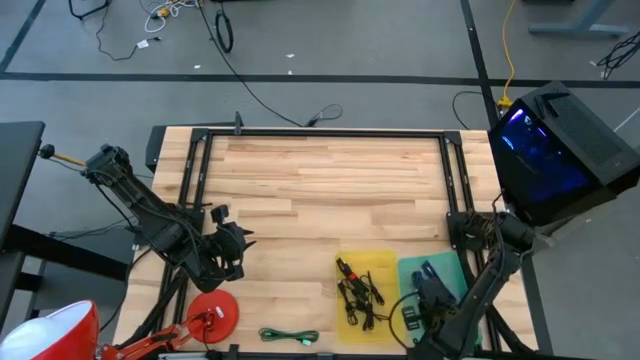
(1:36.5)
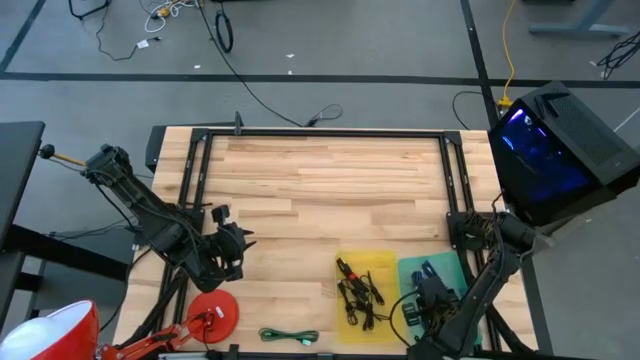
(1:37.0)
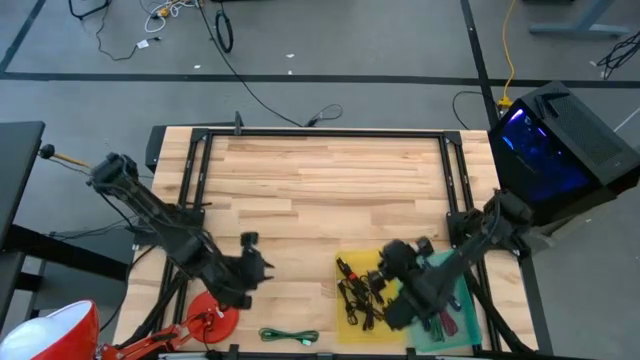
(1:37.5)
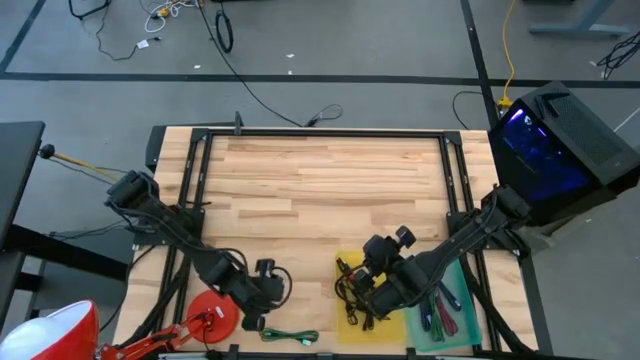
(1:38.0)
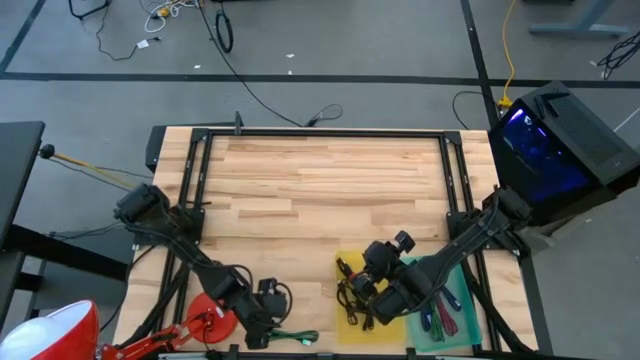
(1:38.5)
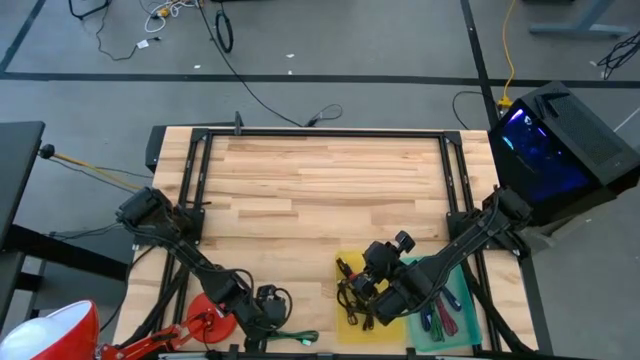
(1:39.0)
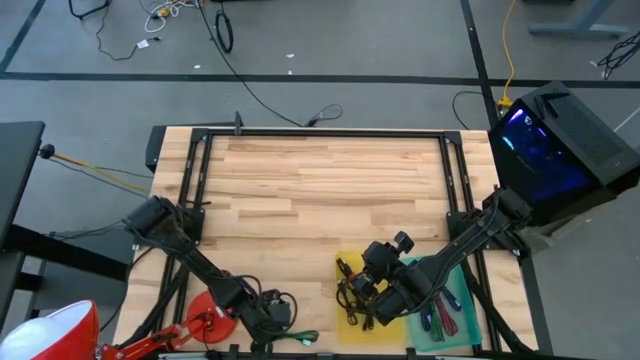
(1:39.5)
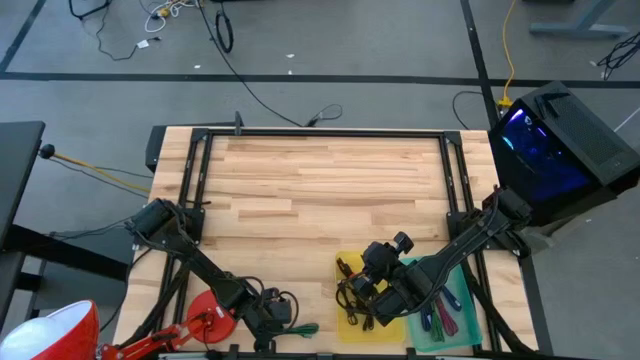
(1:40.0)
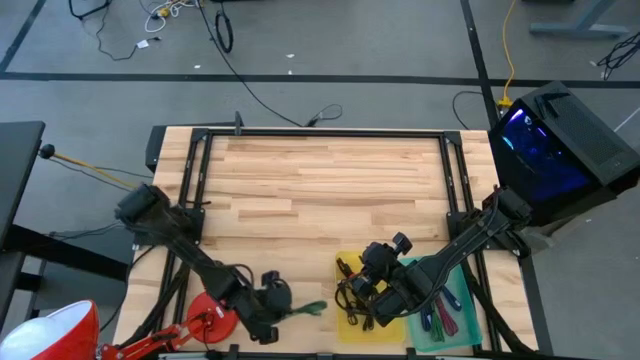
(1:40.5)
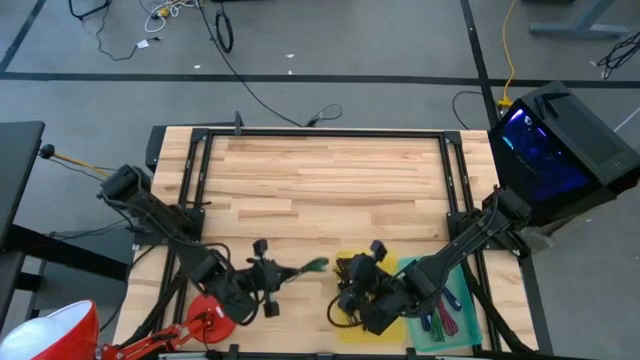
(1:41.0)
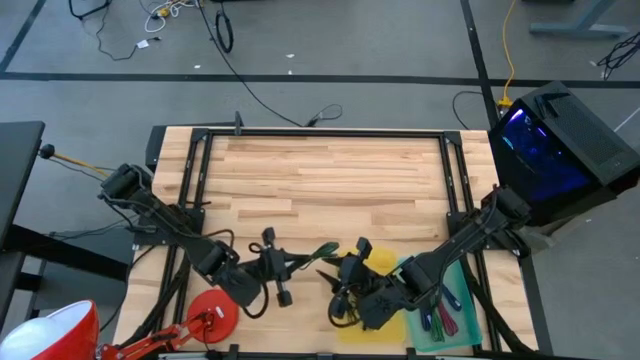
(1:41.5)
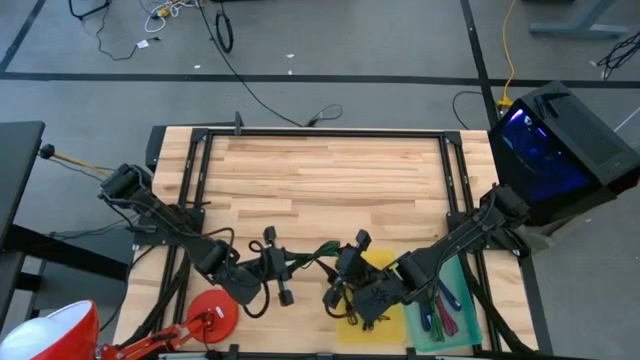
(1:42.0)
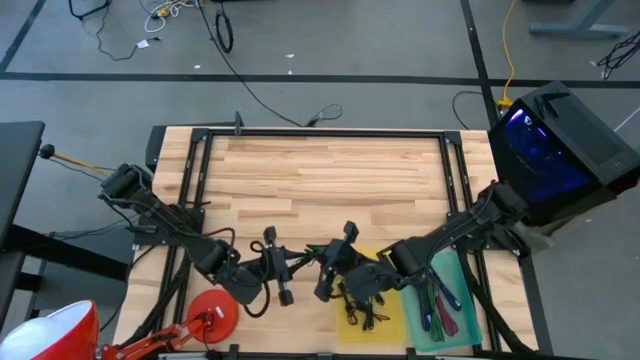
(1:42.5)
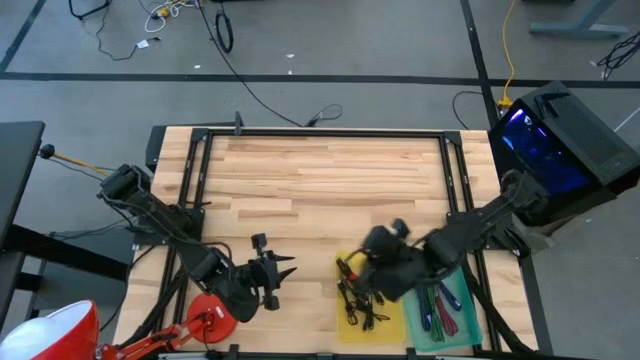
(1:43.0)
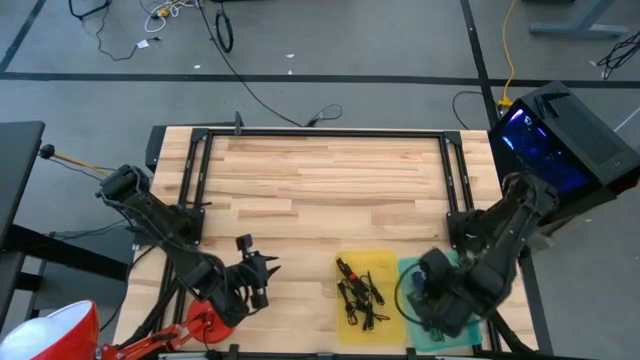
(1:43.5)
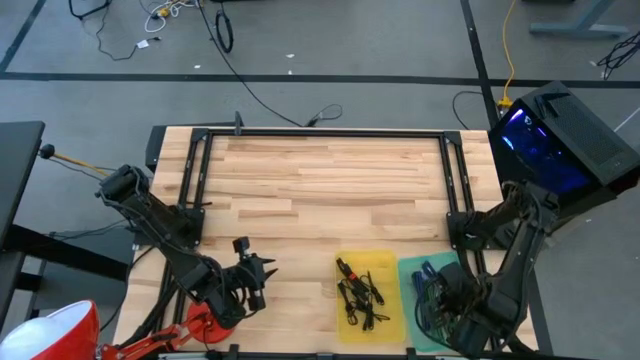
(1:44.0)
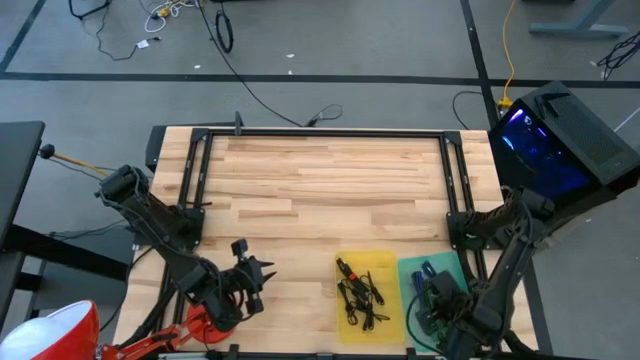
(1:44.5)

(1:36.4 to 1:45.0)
Task: Pick & Place USB Port
Put the green pattern charger cable into the blue bin

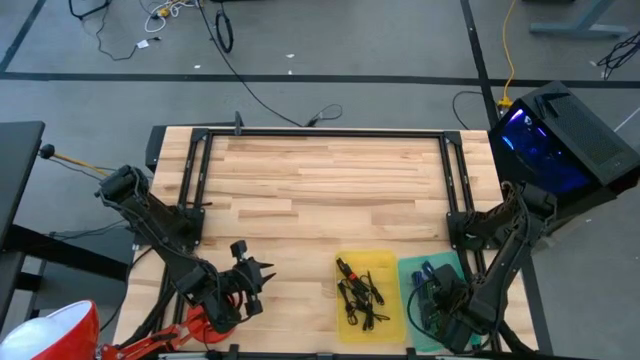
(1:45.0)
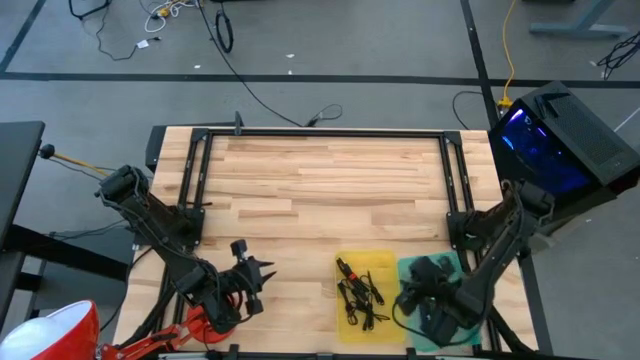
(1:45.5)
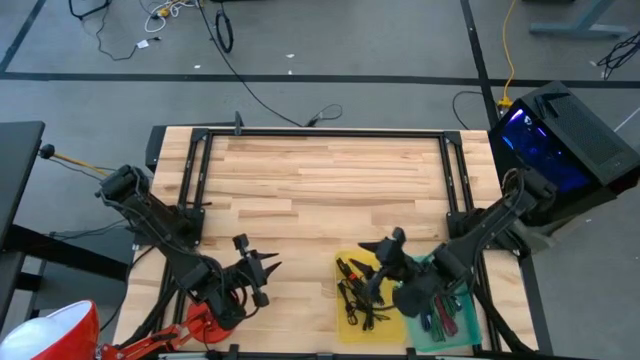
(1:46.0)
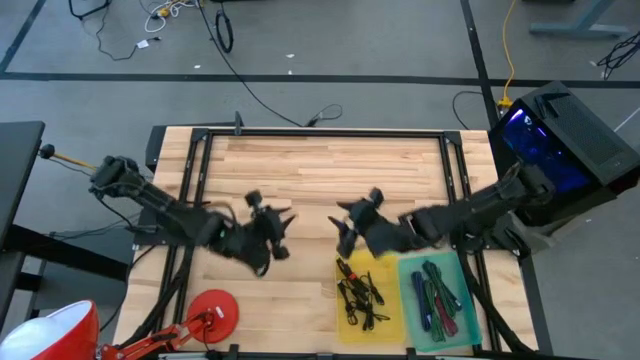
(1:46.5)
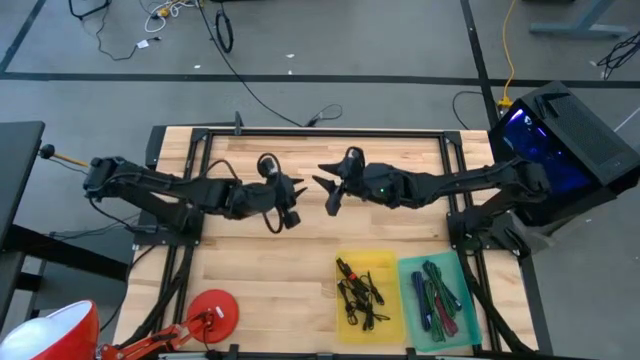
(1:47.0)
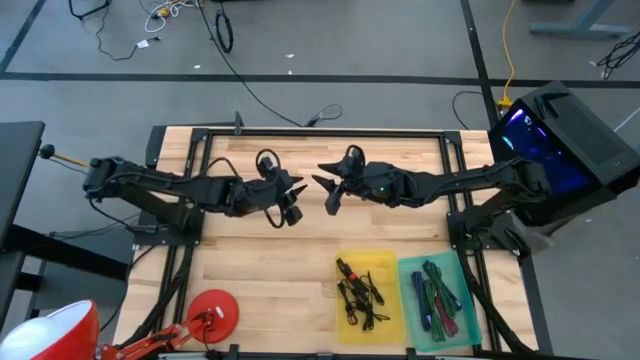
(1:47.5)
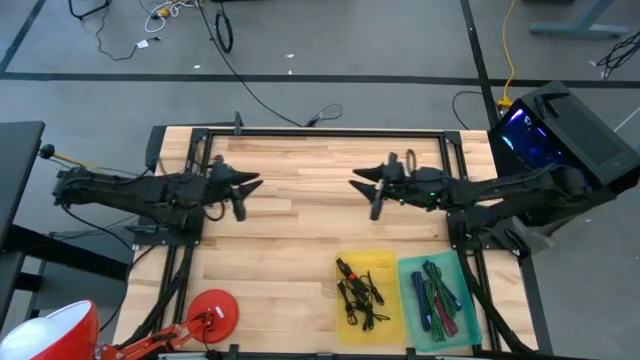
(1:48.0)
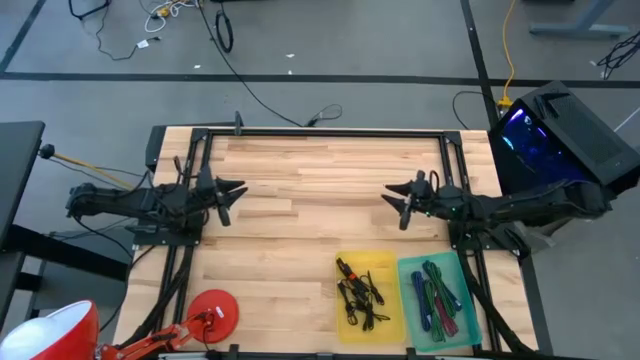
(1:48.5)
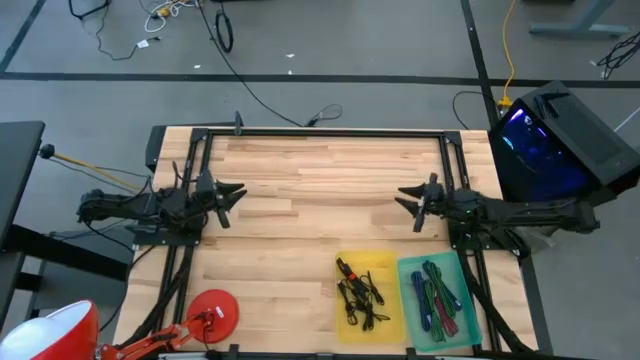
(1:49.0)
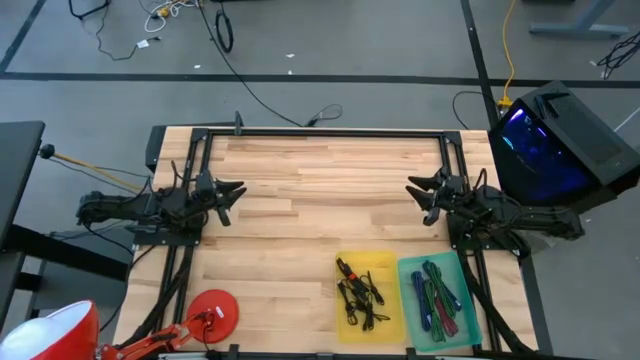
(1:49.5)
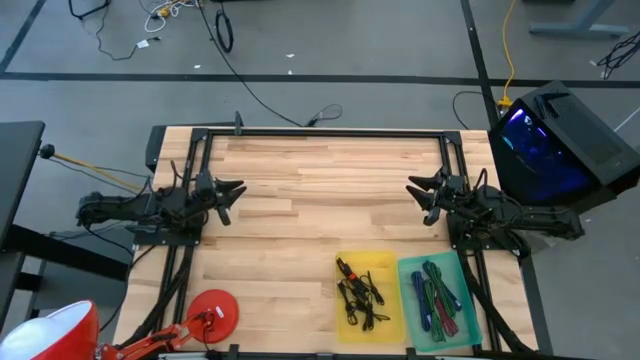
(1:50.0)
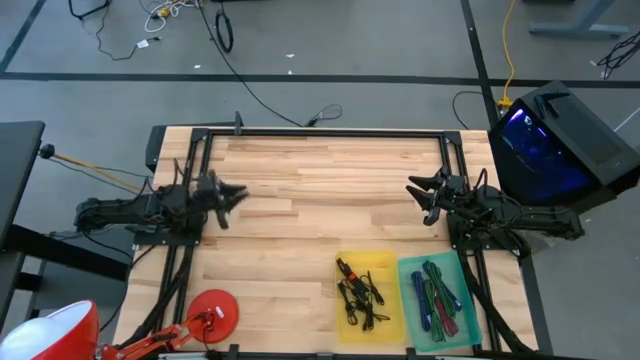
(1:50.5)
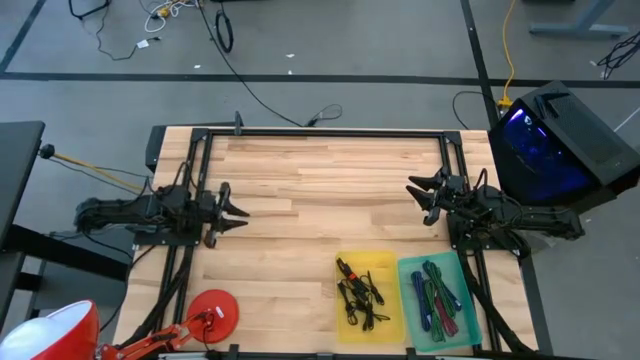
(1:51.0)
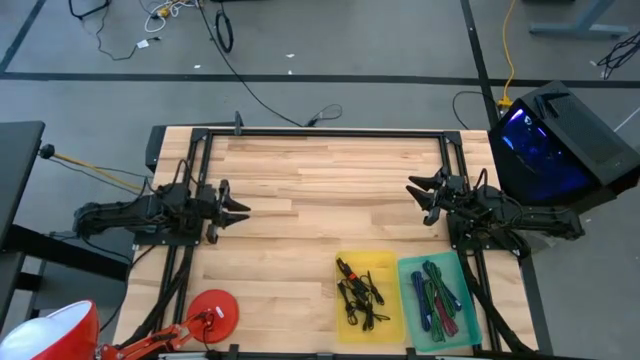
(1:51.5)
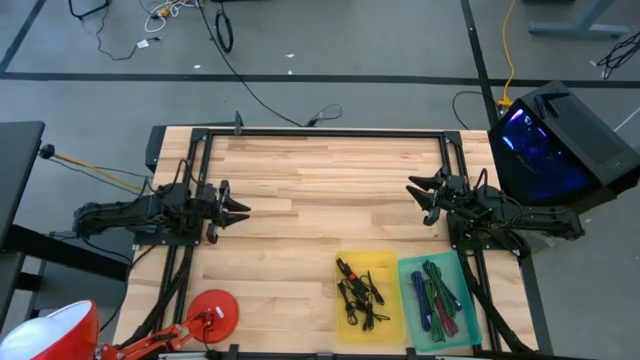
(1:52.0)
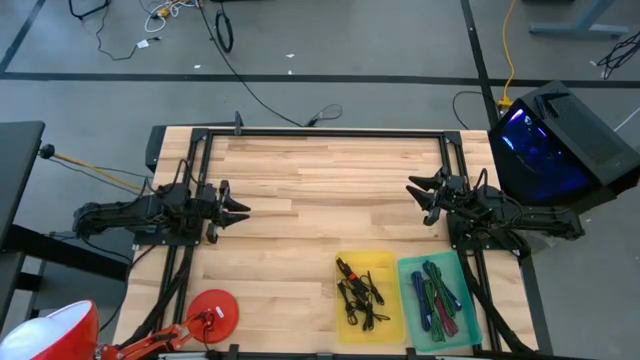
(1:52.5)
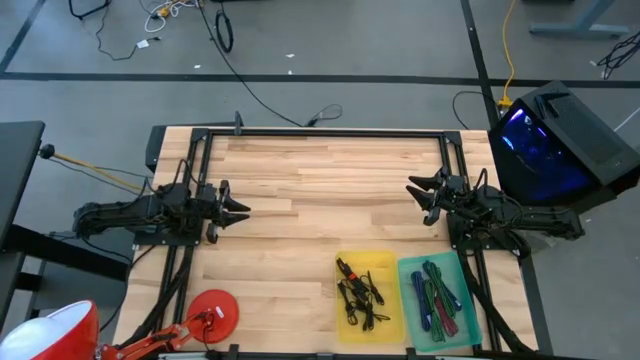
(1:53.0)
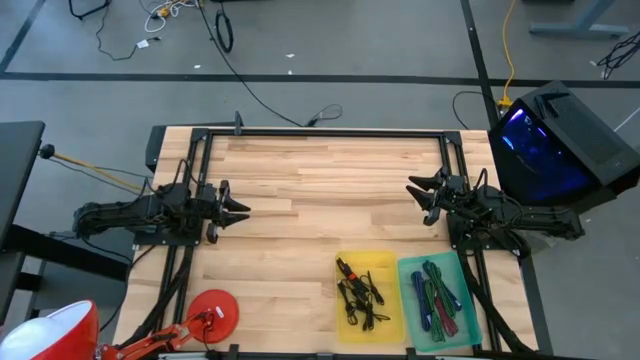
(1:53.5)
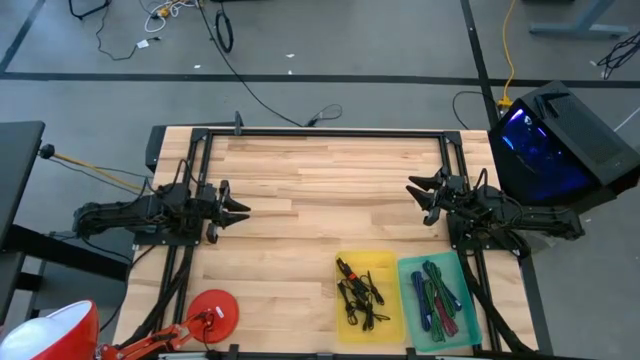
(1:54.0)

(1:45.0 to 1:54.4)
Return to Home Position

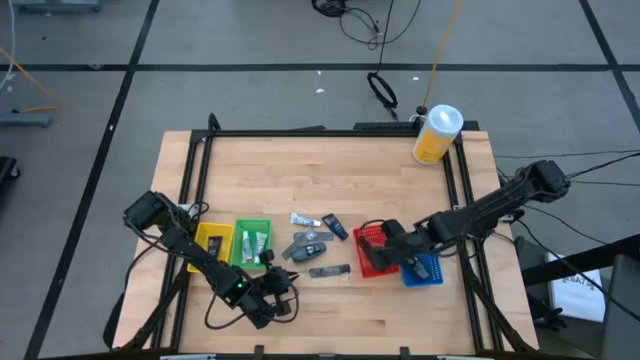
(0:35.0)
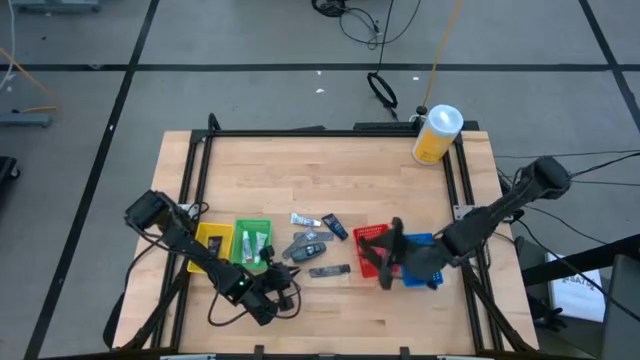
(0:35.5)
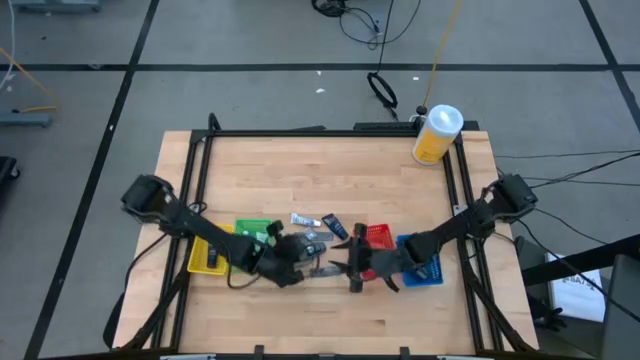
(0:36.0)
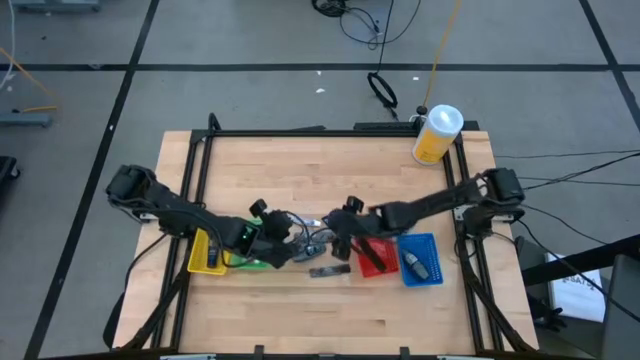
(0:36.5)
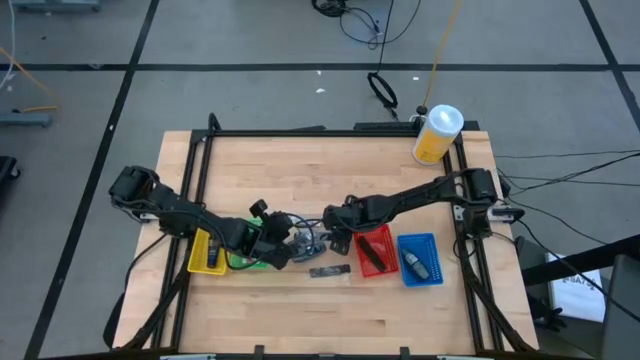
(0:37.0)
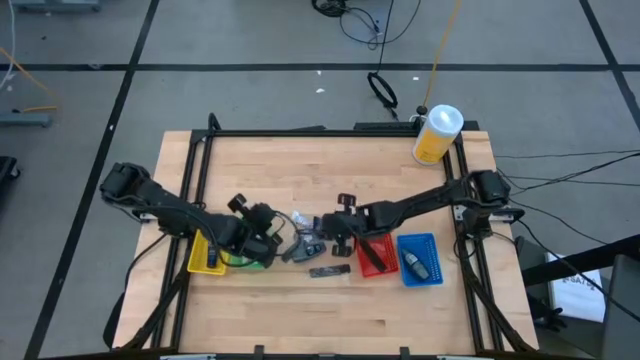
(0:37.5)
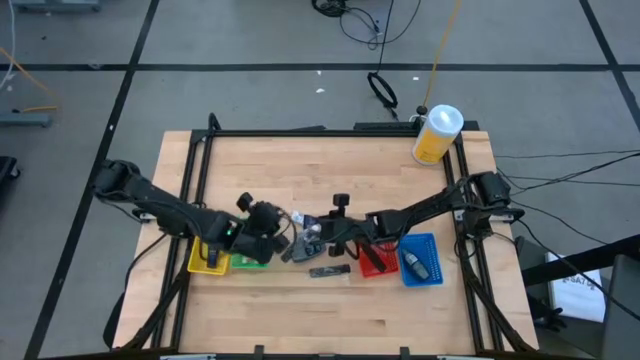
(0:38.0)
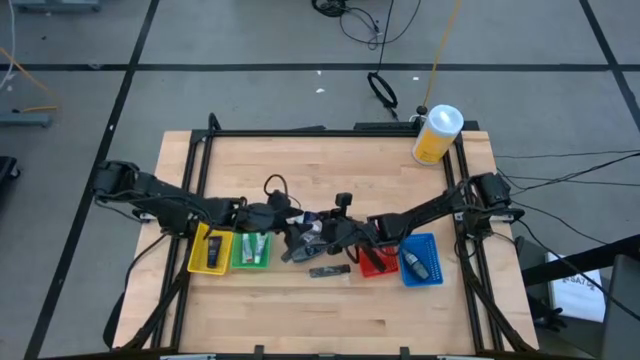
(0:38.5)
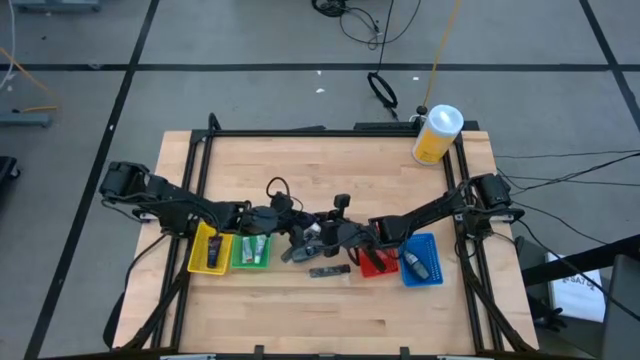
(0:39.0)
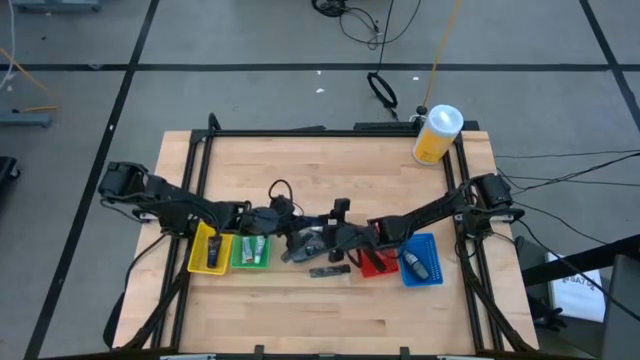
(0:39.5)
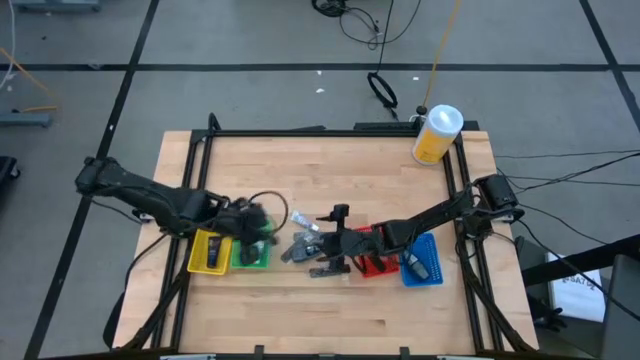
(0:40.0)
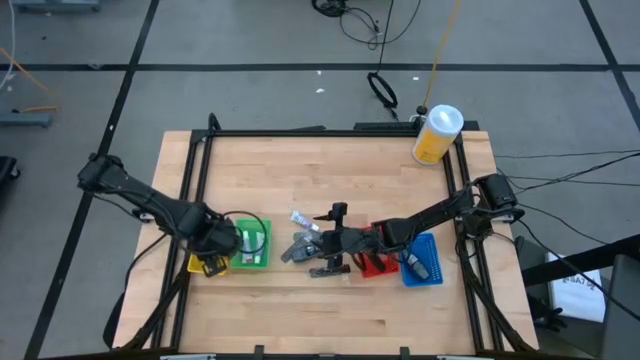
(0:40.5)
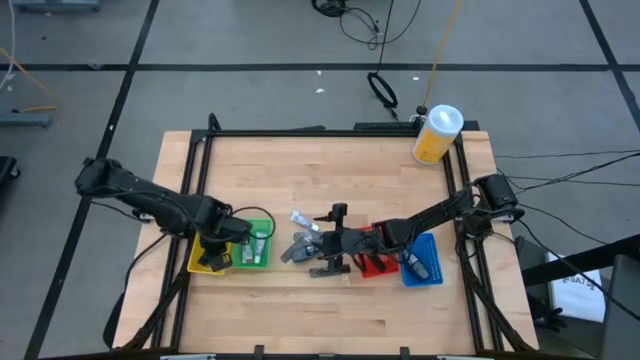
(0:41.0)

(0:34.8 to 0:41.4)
Task: Pick & Place Travel size toiletries
Put the blue shave cream into the yellow bin
